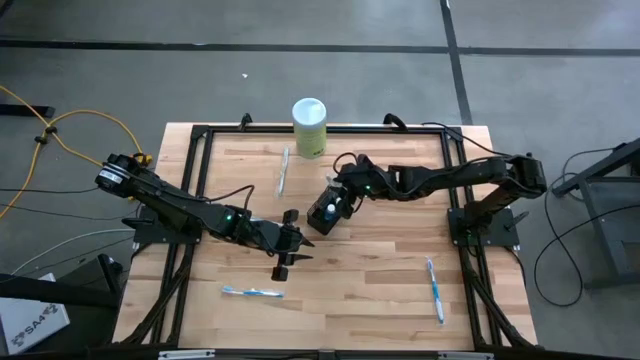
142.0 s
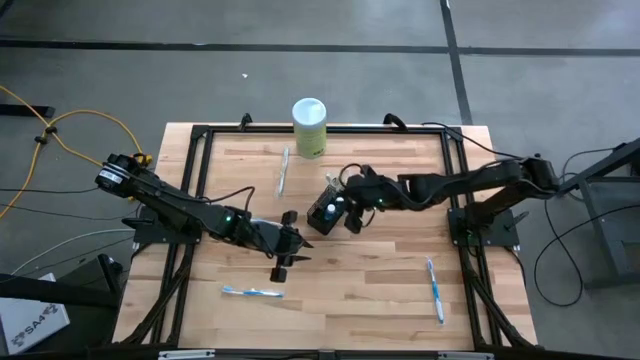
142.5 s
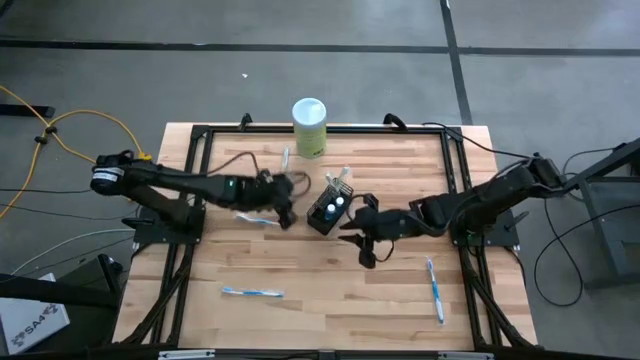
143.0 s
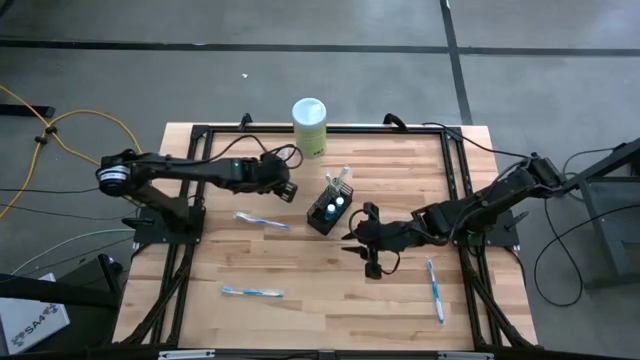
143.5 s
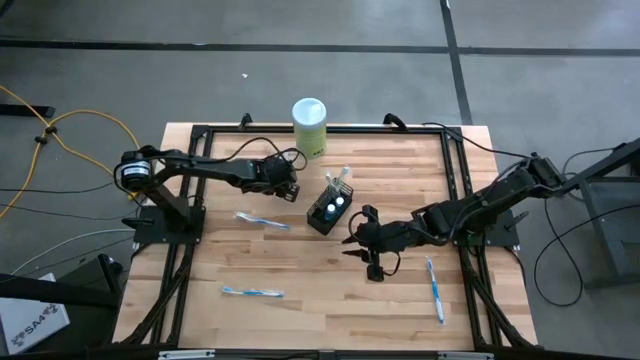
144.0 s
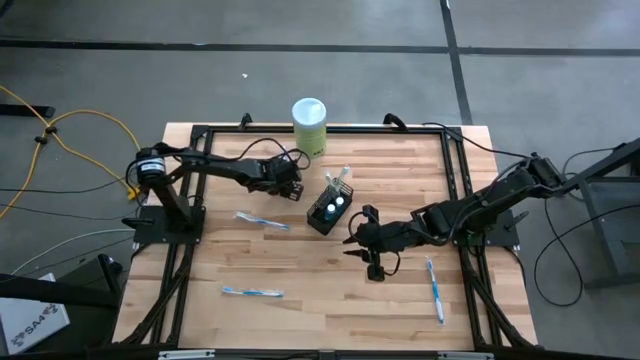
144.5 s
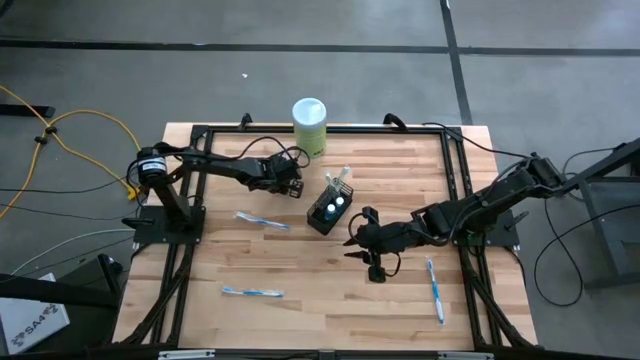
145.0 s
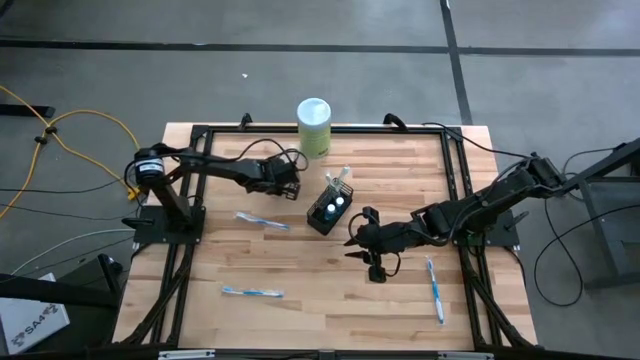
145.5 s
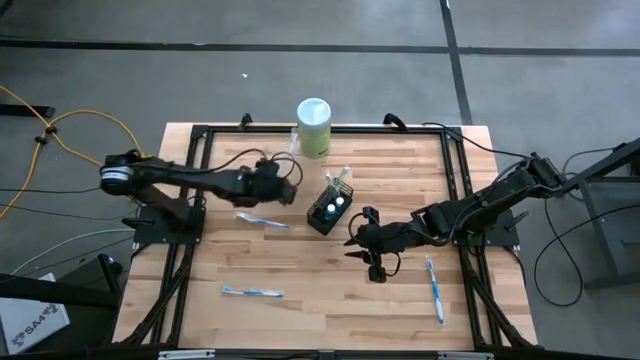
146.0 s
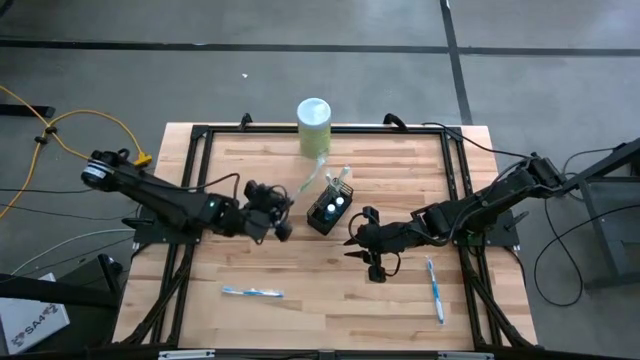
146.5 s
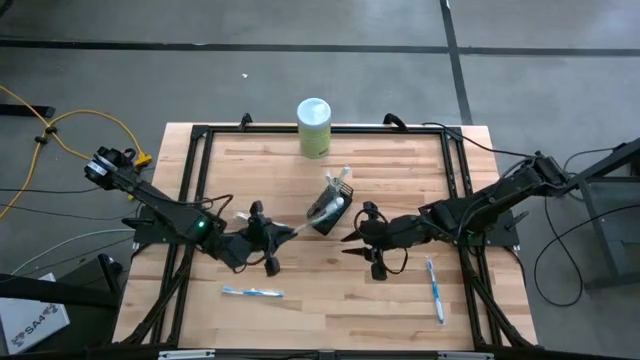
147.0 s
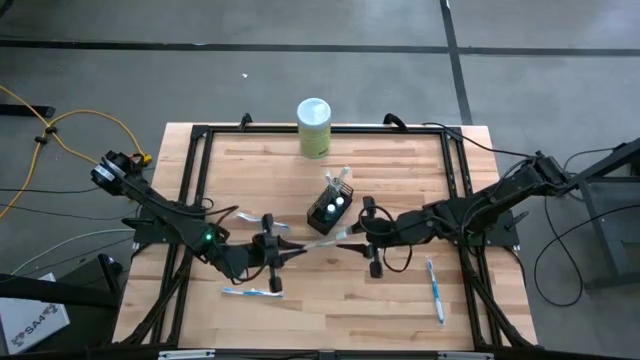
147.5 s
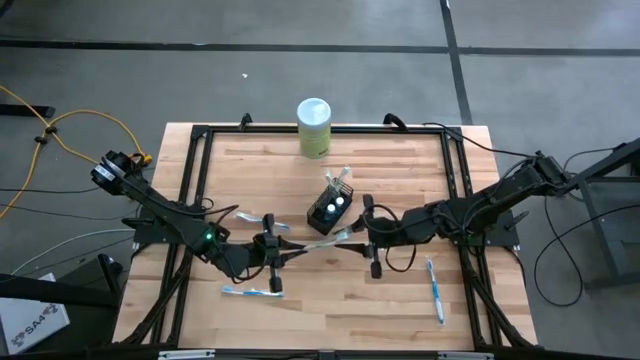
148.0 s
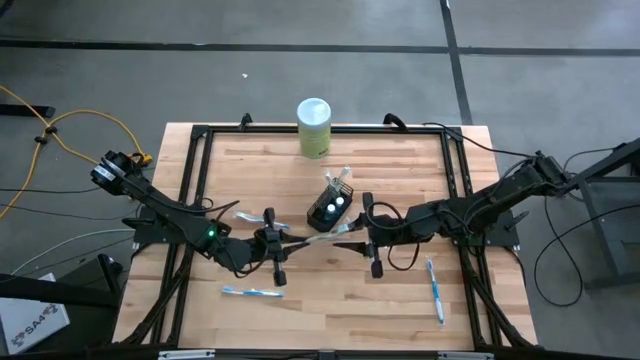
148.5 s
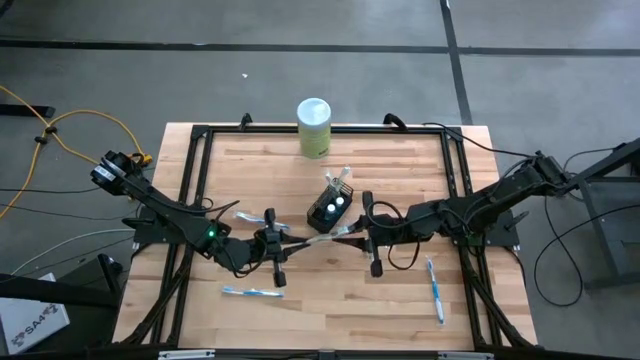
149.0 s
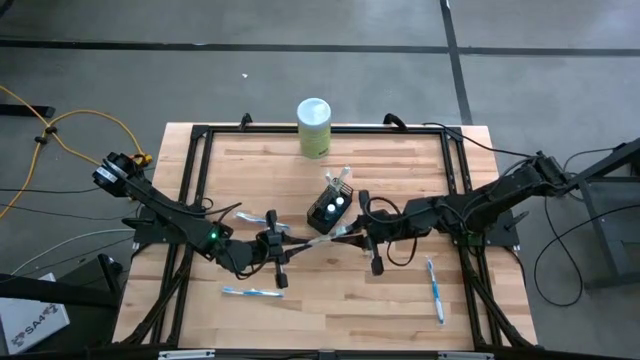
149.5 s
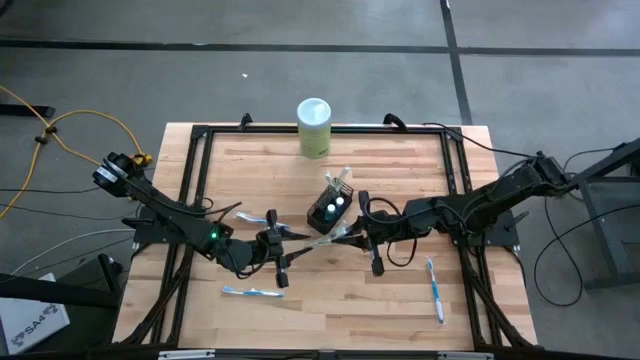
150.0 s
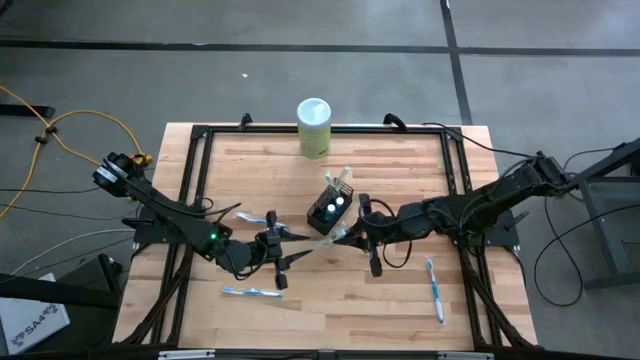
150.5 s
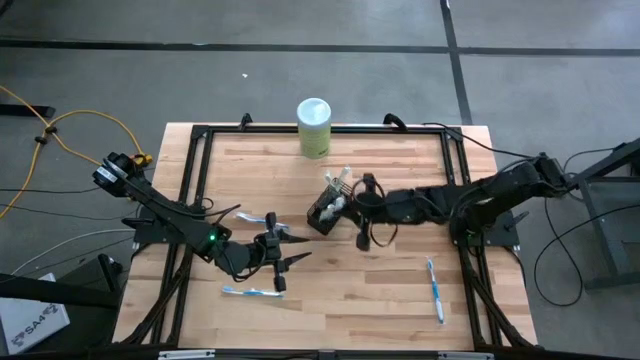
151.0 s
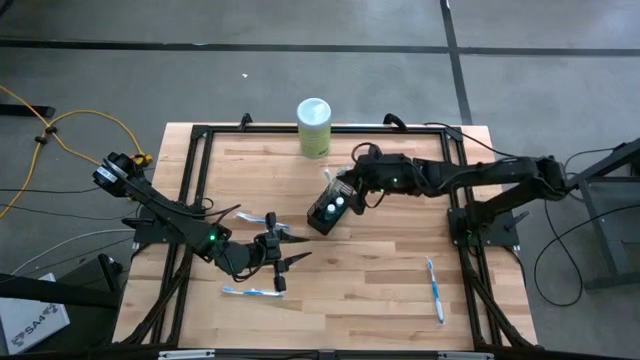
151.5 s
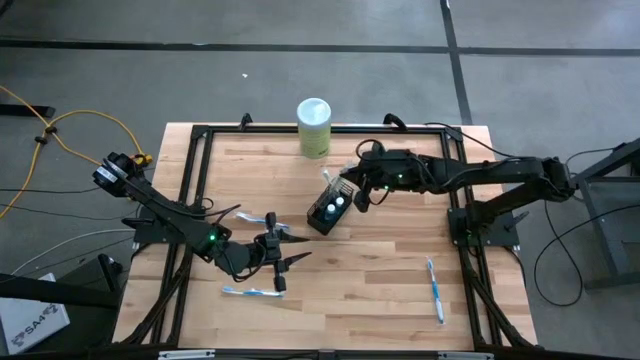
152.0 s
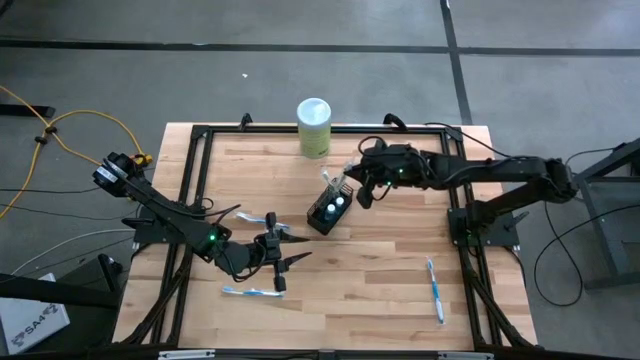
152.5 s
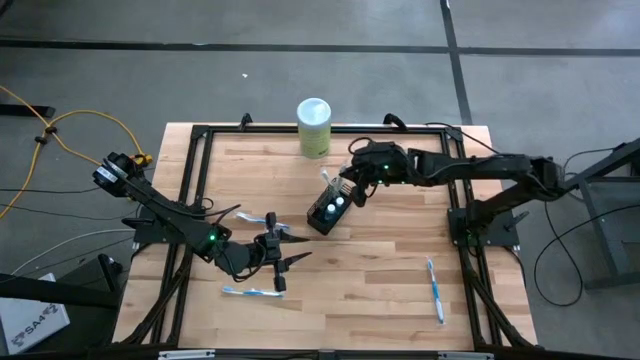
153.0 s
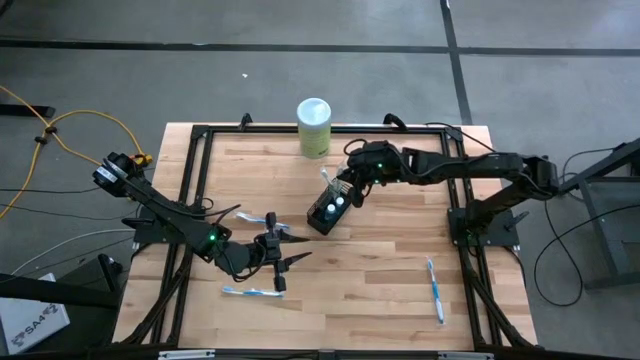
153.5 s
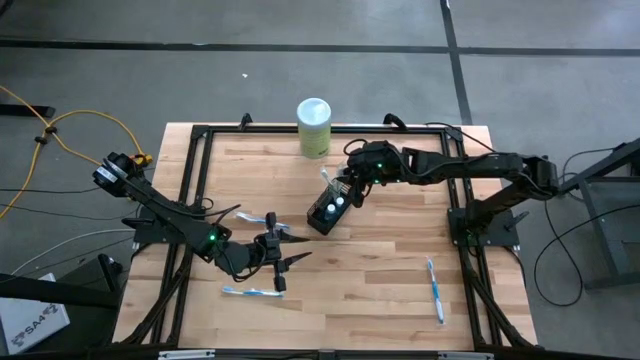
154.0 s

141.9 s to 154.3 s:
Task: Pick & Place toothbrushing station
Put the green toothbrush into the section of the right black wire organizer
